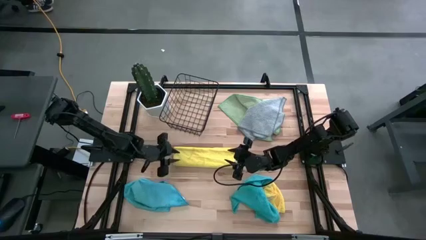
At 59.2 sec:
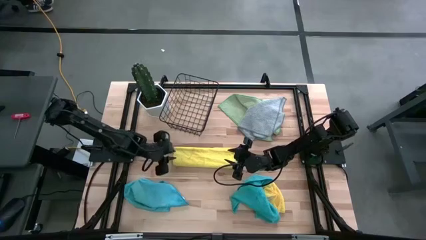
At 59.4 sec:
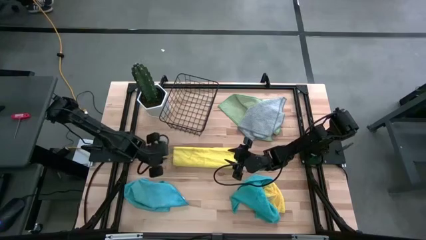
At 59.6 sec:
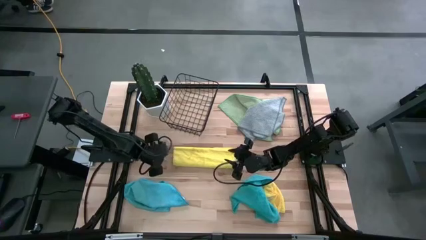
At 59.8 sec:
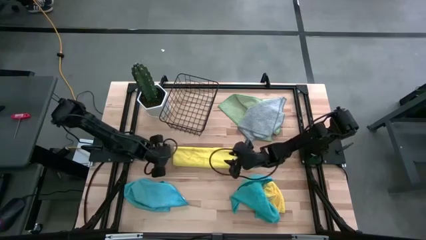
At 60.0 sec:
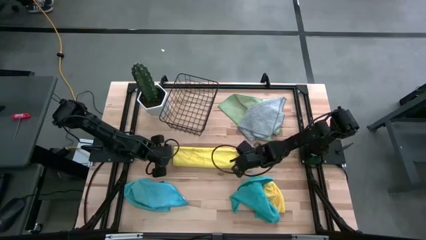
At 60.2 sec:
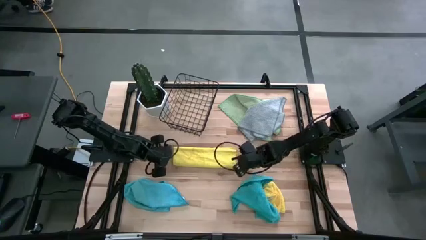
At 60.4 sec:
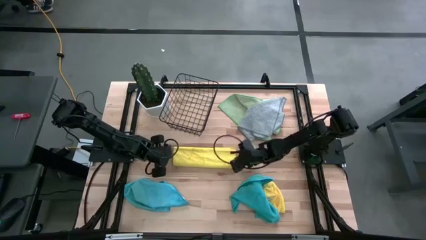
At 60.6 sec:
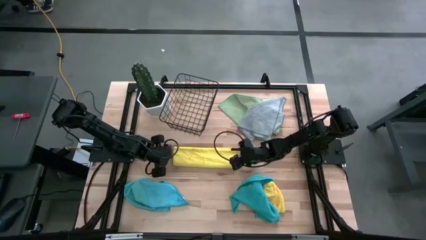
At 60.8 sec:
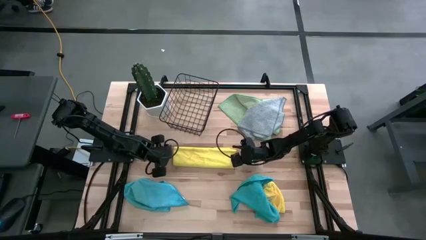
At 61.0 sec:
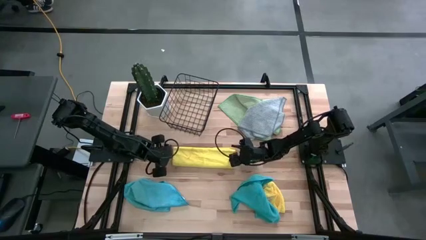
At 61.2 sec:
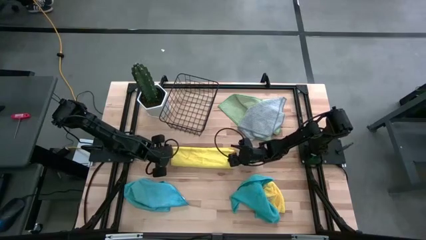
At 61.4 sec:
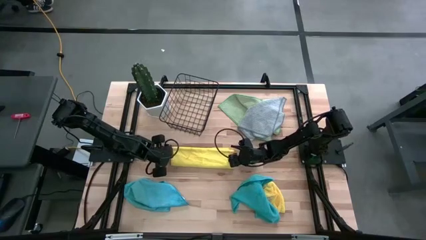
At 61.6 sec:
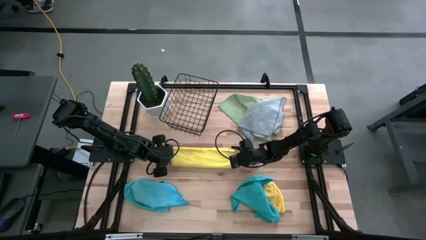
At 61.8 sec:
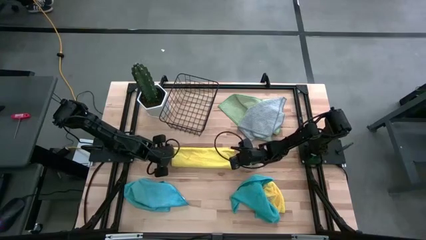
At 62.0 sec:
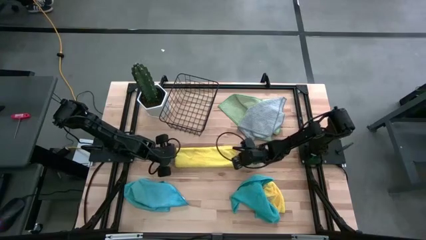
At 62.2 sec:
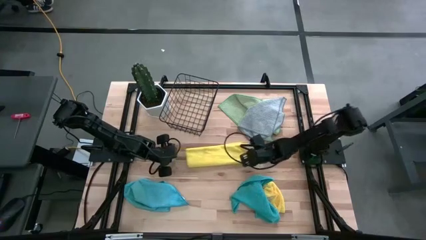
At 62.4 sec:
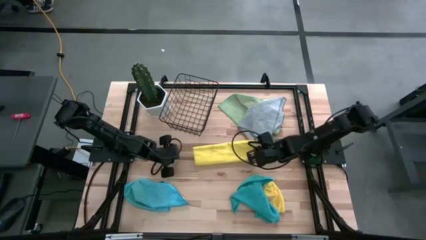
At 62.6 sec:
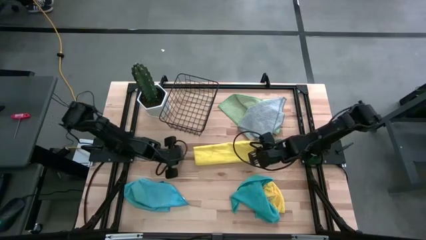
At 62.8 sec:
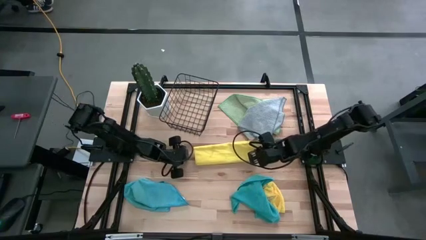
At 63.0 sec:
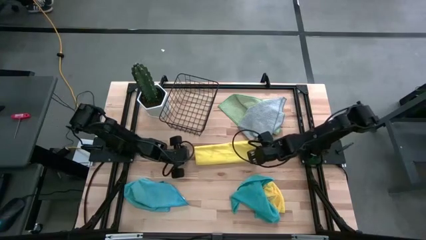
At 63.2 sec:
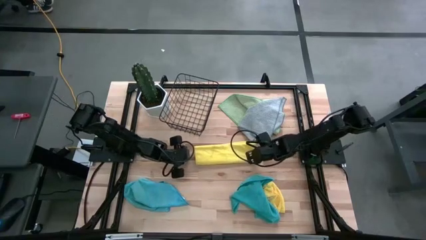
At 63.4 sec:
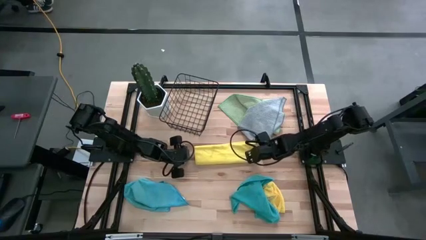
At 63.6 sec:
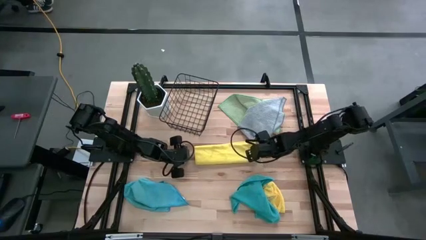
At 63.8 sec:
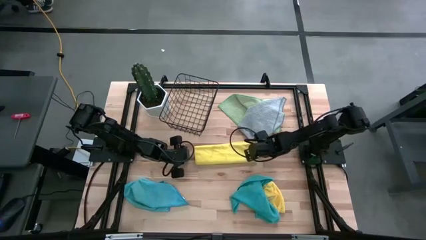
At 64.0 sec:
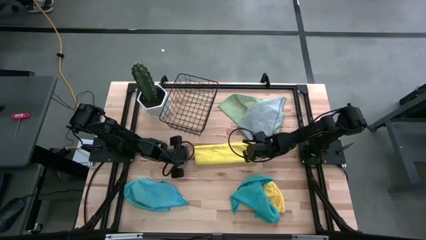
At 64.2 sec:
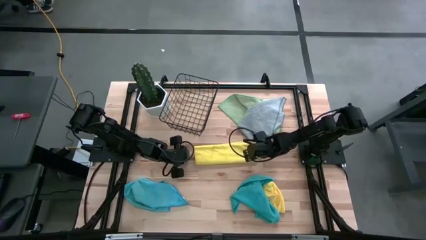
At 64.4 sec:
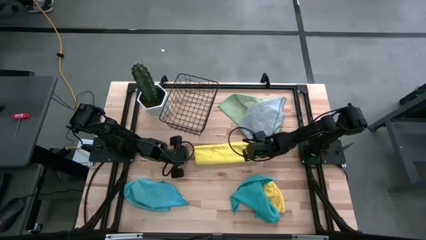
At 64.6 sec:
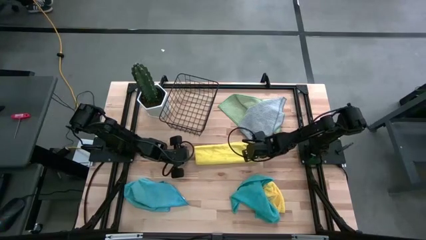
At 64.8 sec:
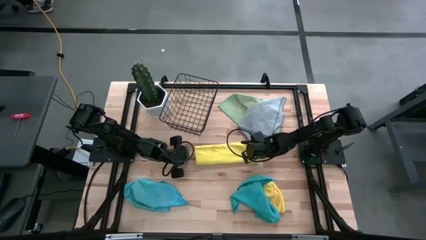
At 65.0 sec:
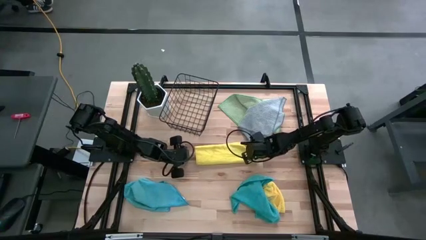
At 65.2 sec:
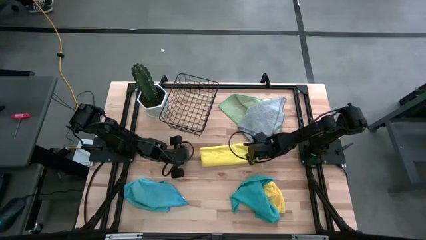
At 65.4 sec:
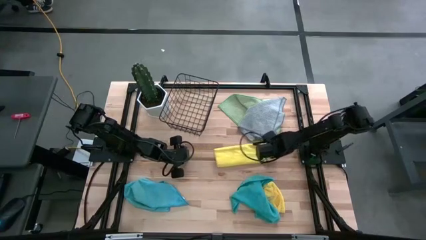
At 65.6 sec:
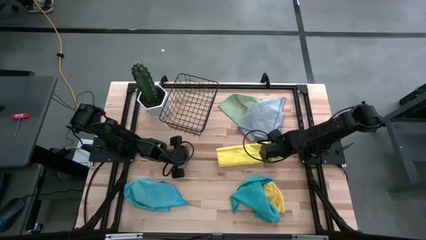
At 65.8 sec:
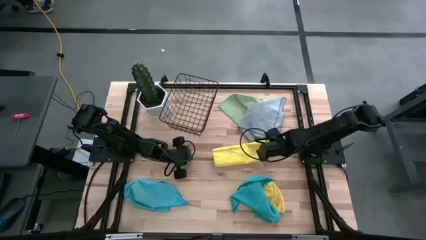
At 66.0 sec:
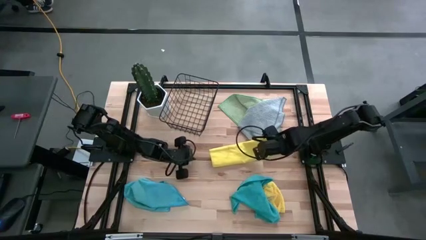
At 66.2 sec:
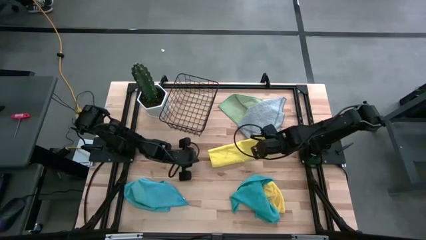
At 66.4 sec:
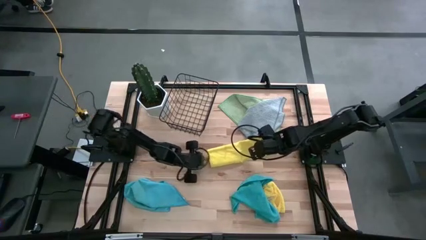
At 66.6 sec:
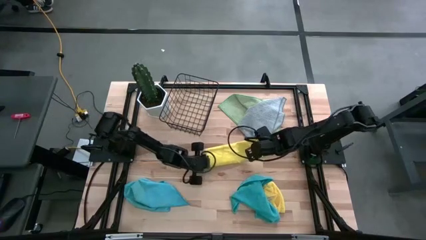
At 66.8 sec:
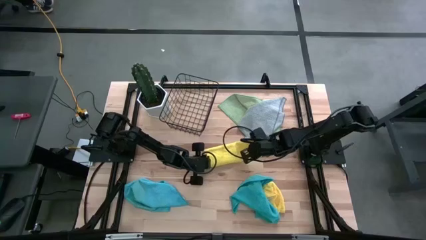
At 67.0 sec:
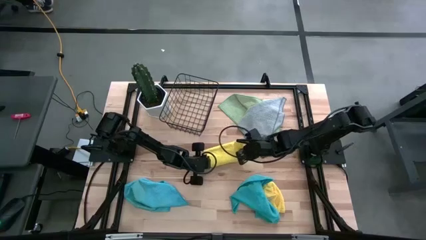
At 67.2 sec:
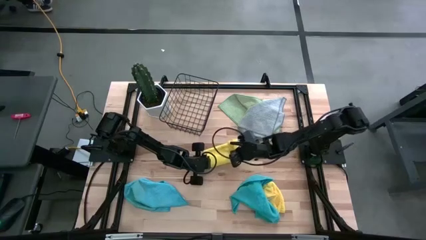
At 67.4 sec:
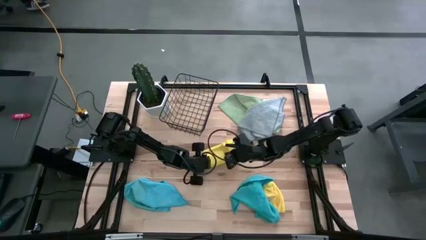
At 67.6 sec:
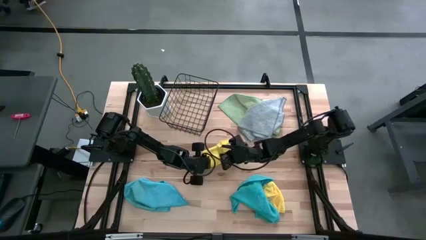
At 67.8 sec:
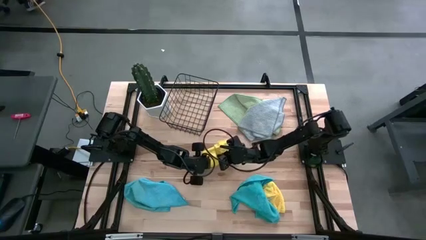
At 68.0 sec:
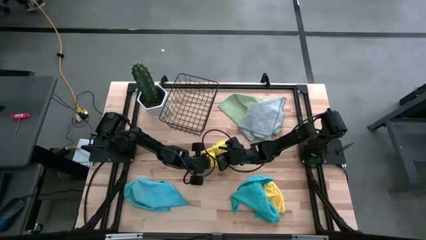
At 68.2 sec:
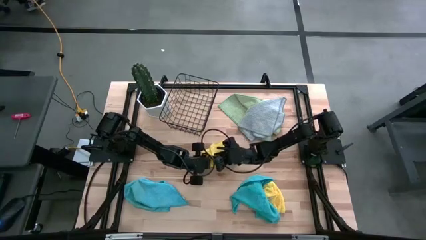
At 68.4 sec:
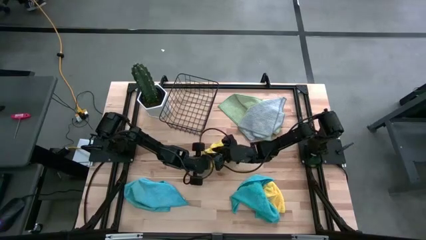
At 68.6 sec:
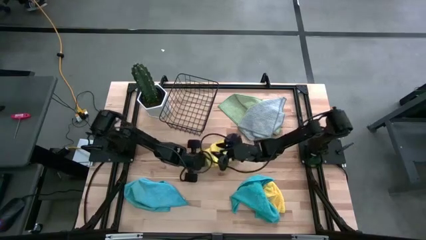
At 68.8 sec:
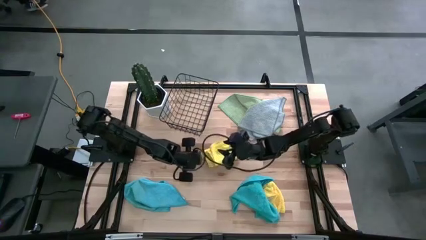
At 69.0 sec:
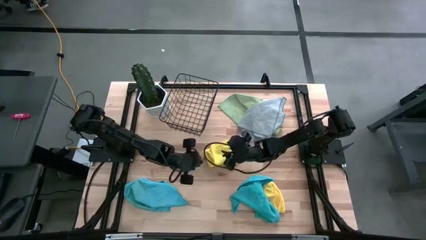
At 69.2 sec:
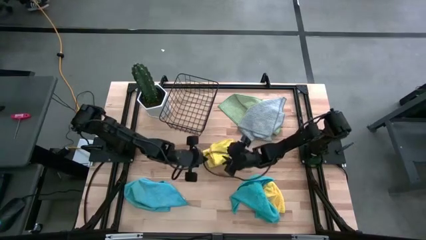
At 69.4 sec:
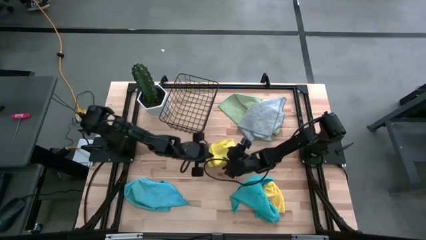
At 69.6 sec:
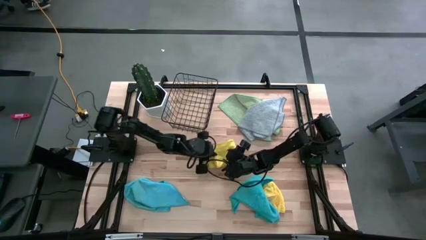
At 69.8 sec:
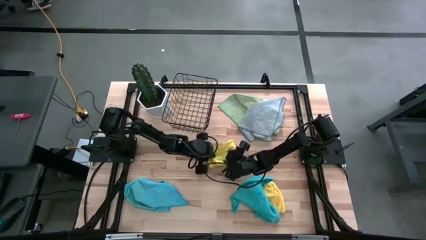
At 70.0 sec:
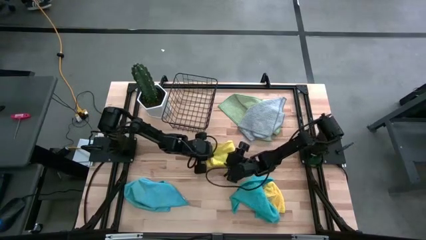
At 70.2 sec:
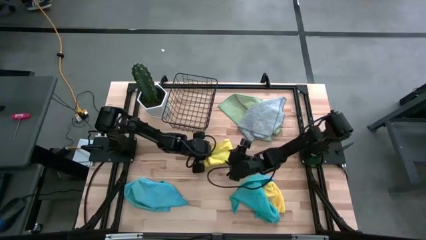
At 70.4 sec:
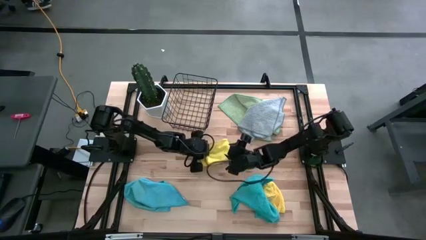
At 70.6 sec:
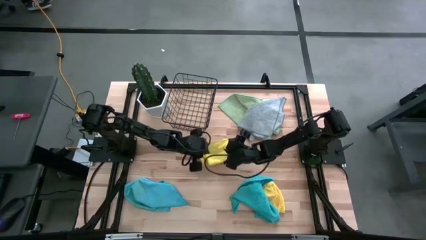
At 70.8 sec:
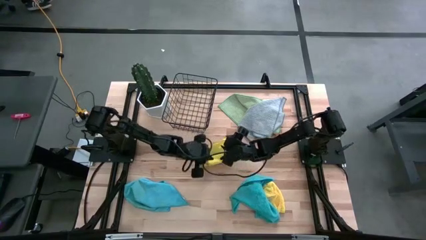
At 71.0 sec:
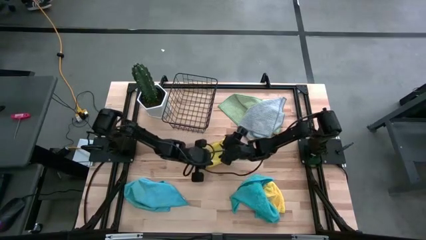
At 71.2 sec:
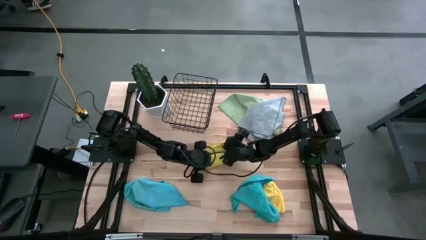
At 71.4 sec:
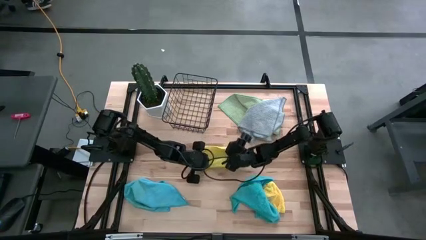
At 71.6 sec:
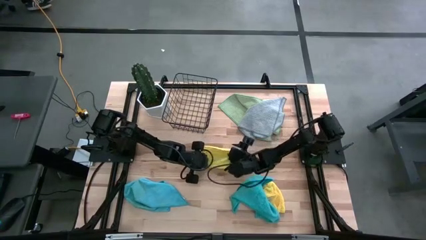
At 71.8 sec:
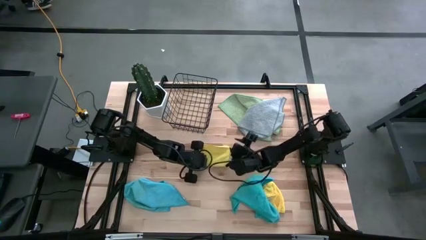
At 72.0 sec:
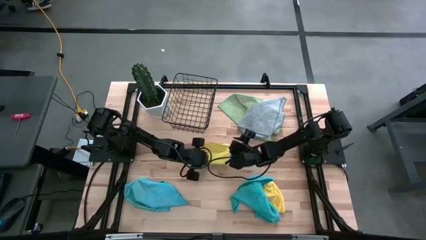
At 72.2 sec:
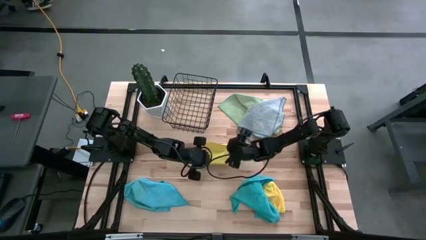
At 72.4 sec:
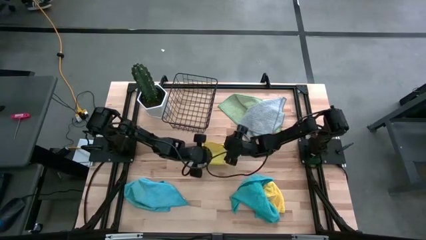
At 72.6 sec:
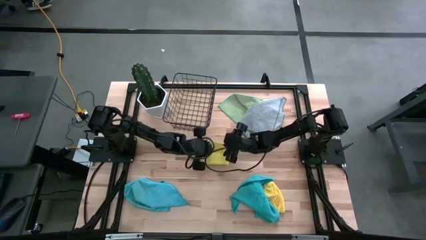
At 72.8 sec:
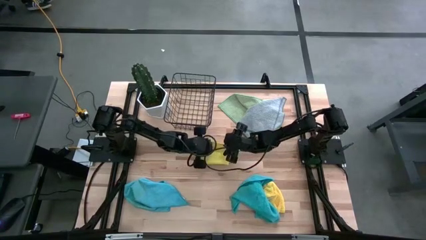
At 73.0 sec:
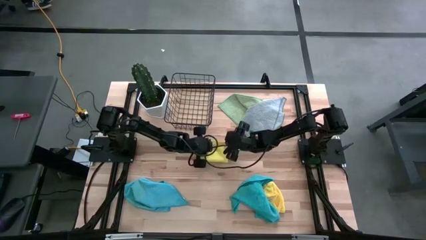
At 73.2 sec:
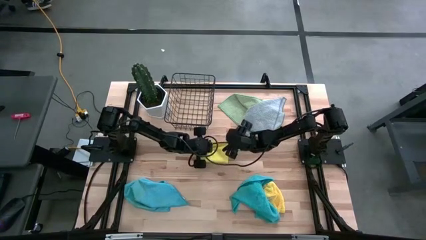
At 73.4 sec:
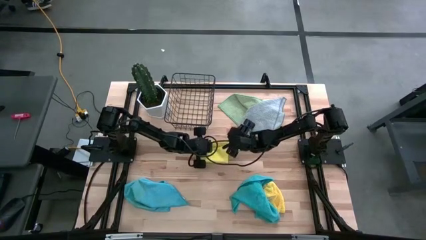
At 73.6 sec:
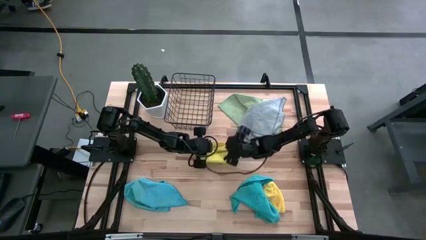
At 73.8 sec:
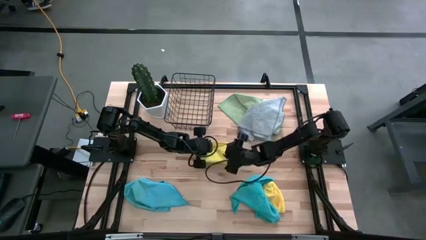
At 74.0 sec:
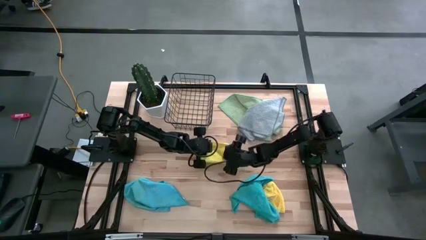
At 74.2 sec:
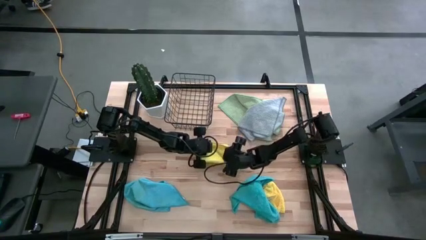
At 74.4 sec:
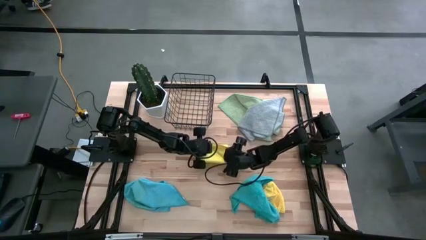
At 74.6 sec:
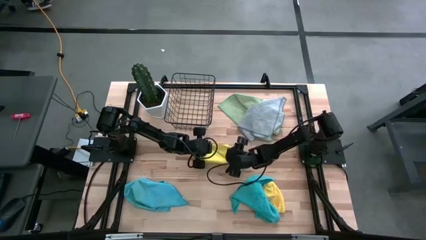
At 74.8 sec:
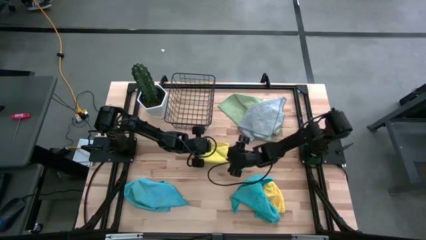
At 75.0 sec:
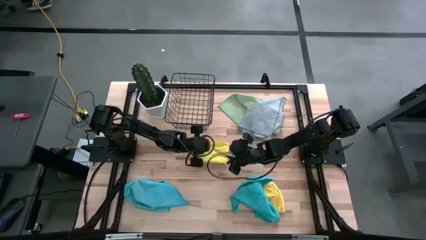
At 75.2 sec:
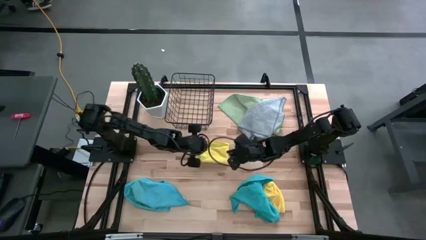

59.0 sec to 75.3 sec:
Task: Fold microfiber towels
Fold the left yellow microfiber cloth

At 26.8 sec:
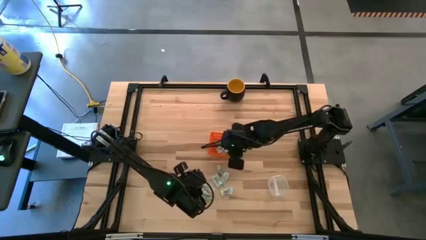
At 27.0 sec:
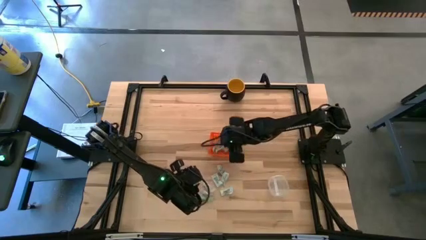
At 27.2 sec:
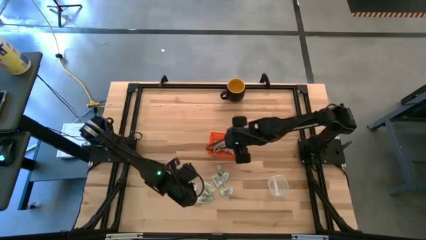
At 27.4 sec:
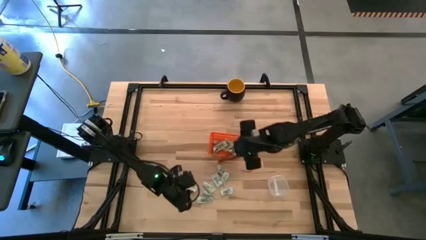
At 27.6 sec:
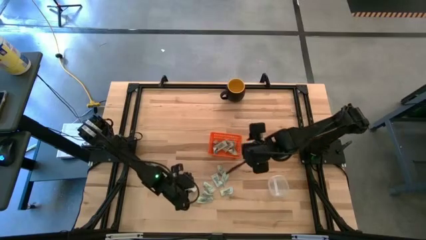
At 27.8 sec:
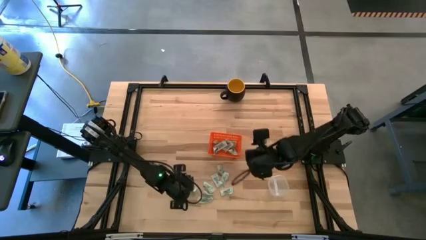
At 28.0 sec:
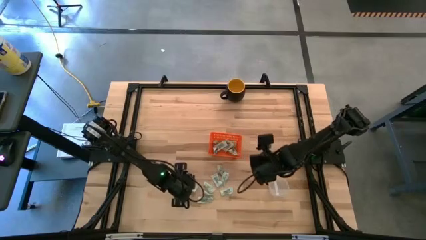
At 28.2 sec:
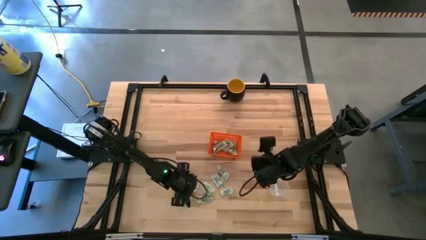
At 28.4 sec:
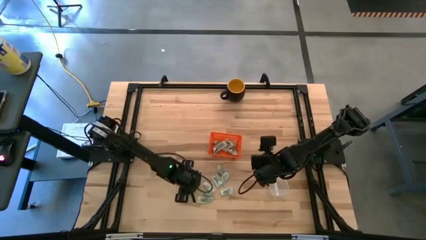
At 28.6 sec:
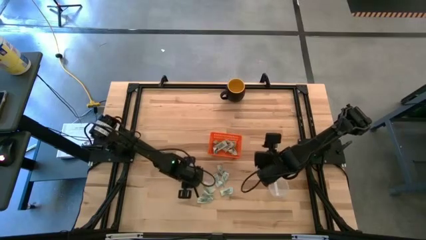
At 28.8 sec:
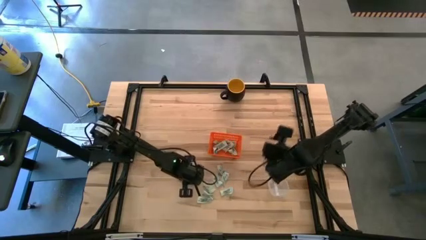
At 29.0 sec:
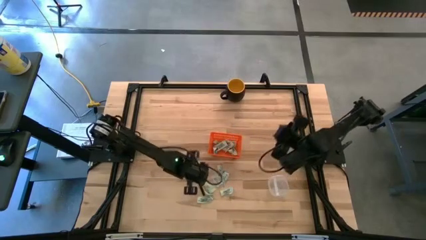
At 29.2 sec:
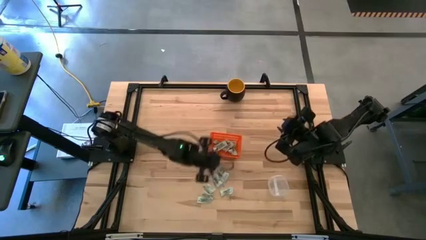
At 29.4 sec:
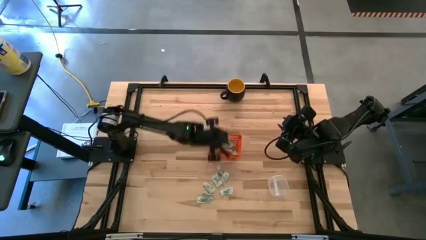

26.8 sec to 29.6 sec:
Task: Pick and place items into bin
Put the light green stevia packet into the orange bin
